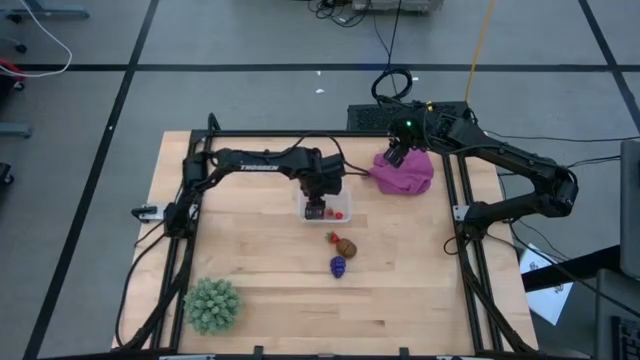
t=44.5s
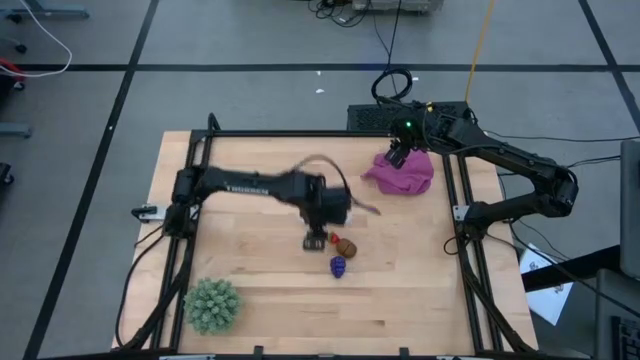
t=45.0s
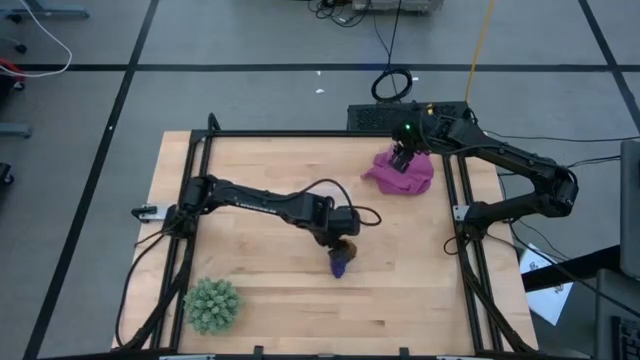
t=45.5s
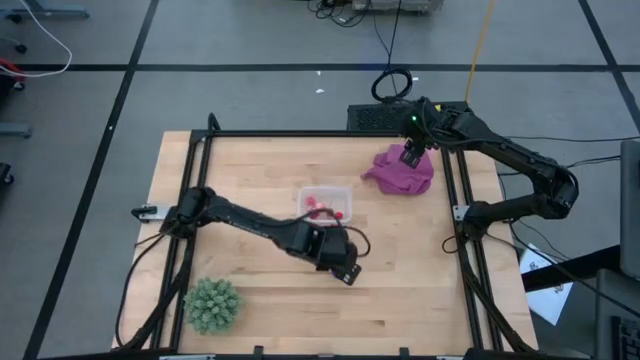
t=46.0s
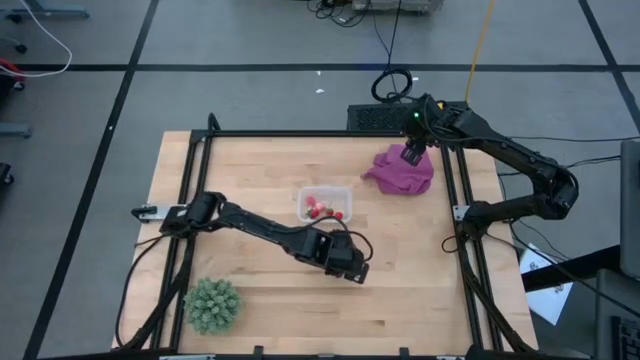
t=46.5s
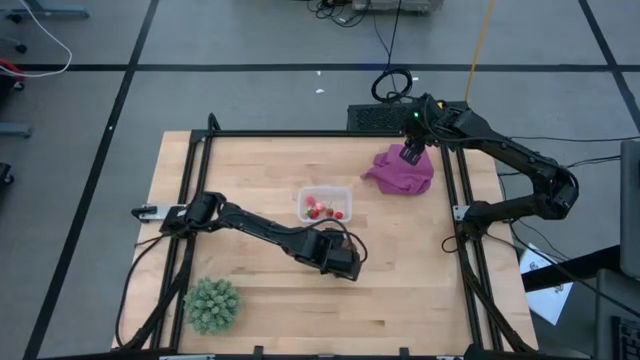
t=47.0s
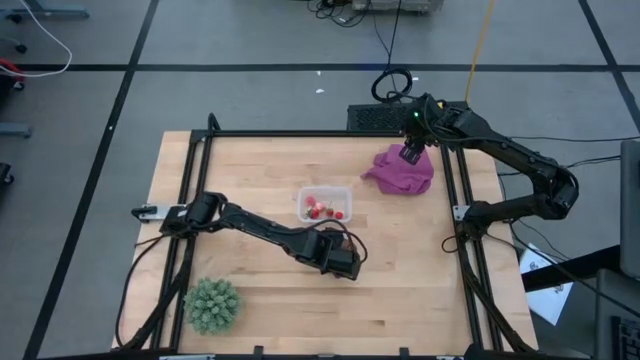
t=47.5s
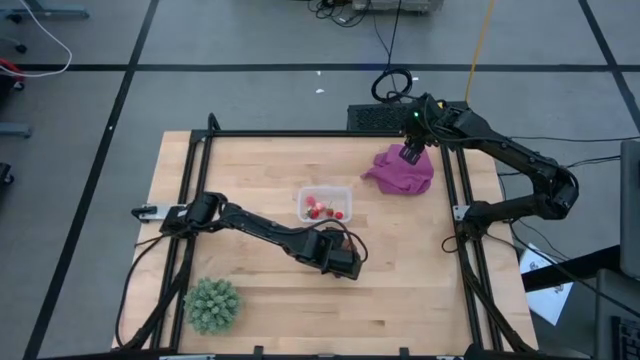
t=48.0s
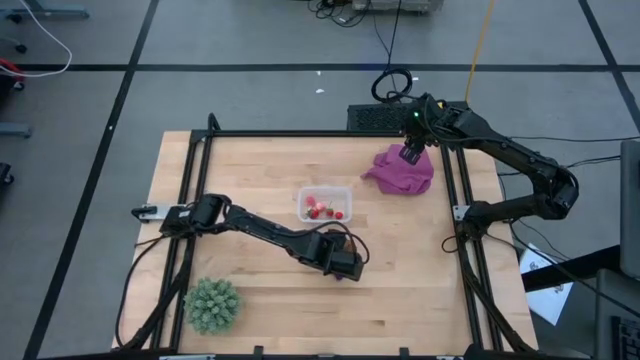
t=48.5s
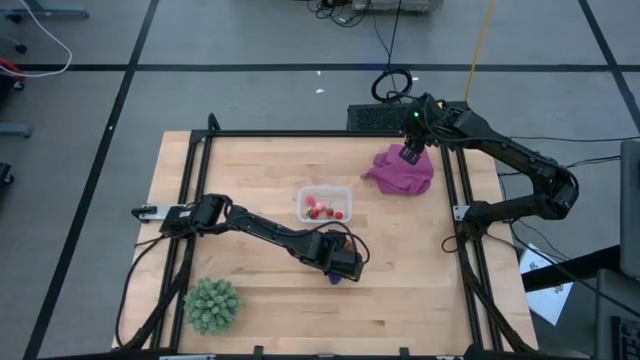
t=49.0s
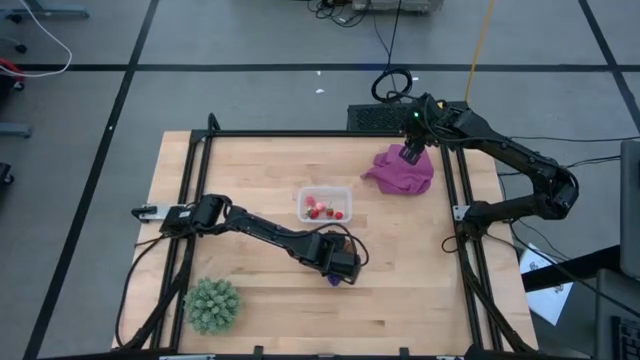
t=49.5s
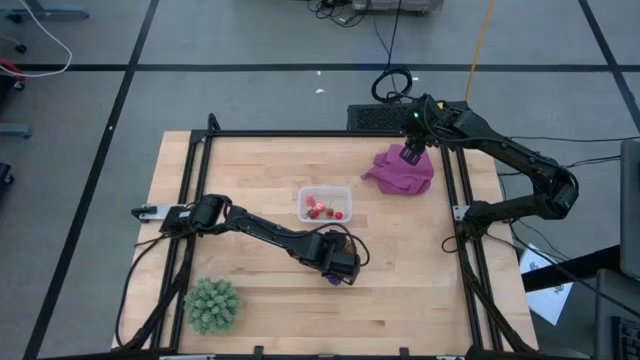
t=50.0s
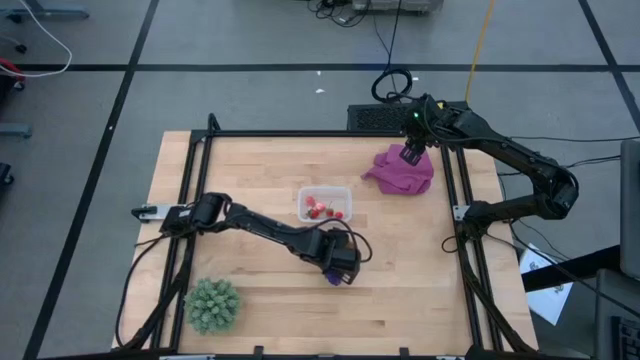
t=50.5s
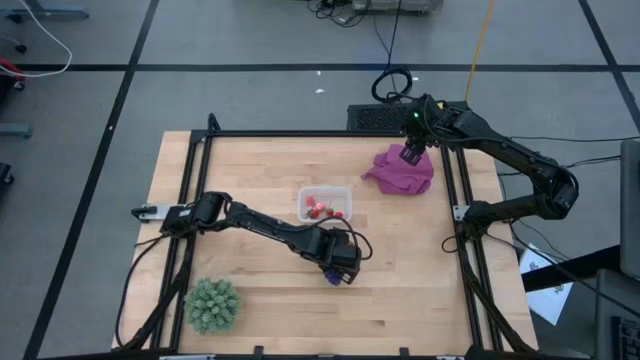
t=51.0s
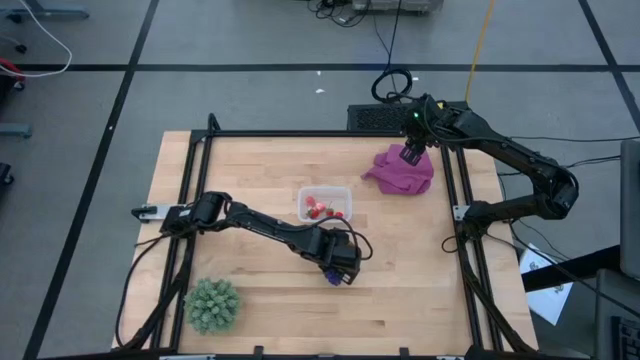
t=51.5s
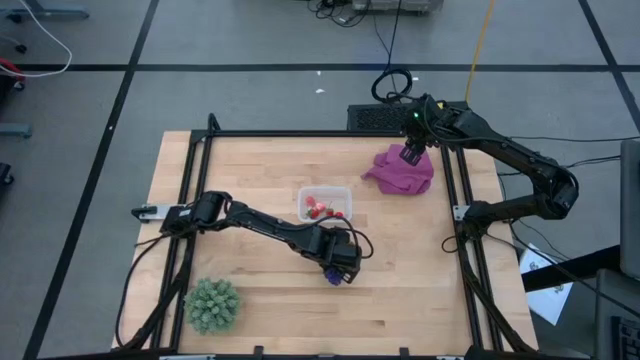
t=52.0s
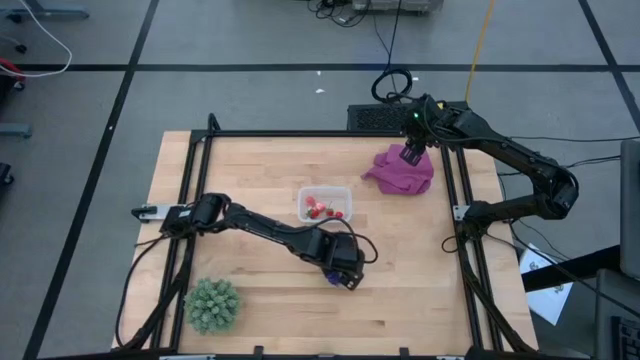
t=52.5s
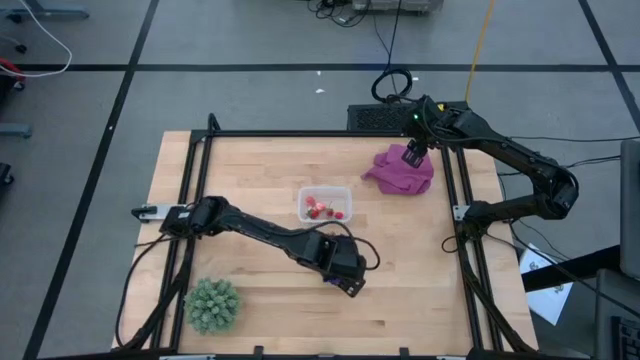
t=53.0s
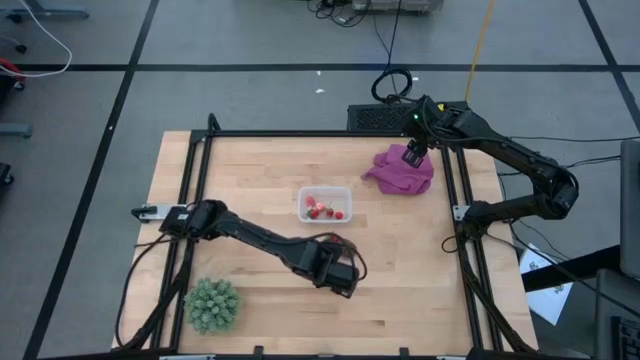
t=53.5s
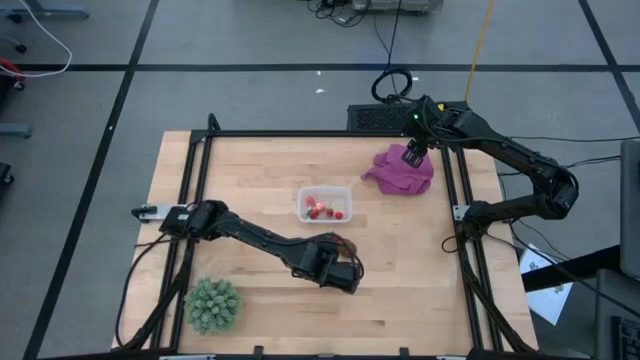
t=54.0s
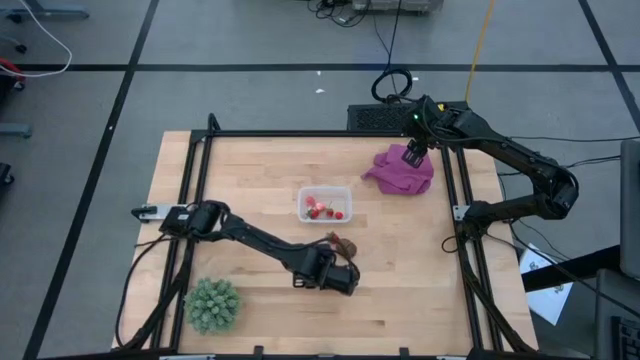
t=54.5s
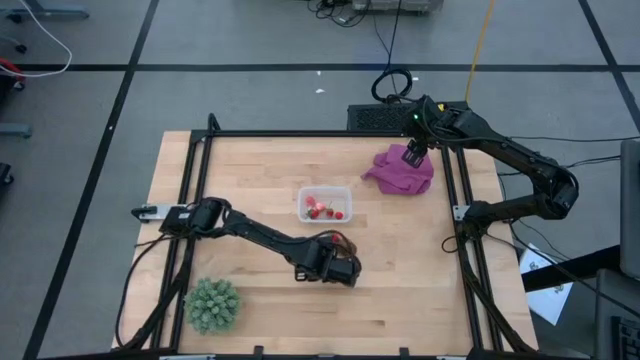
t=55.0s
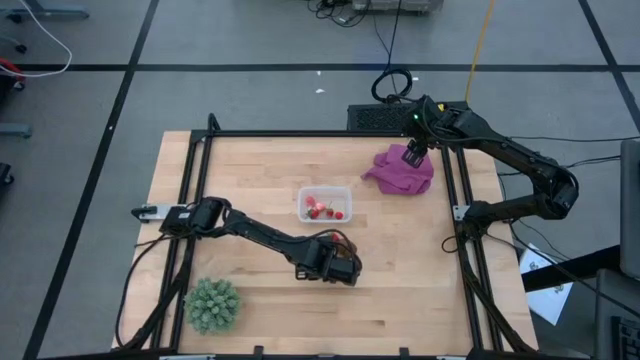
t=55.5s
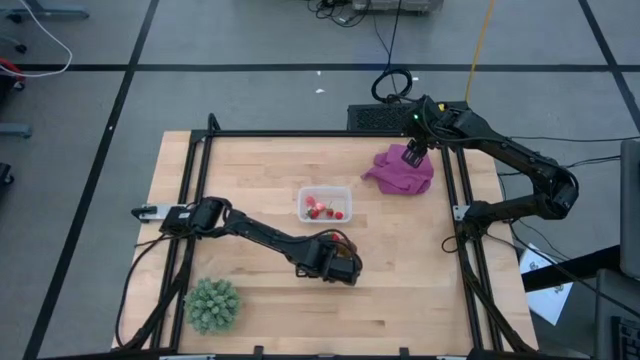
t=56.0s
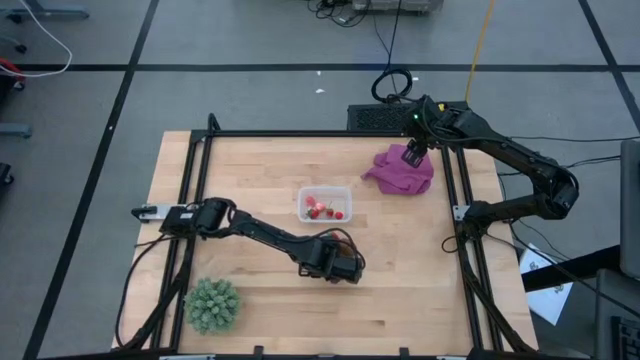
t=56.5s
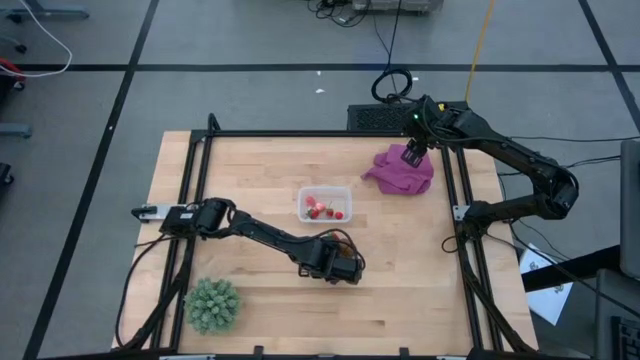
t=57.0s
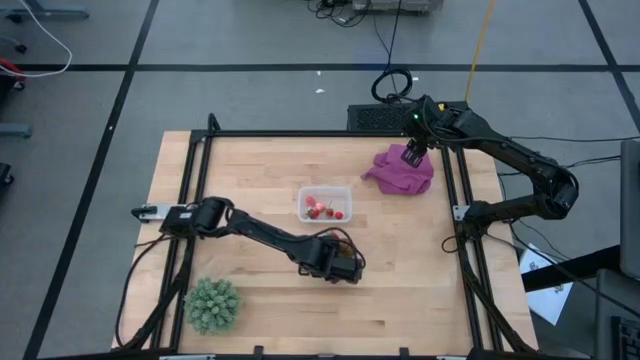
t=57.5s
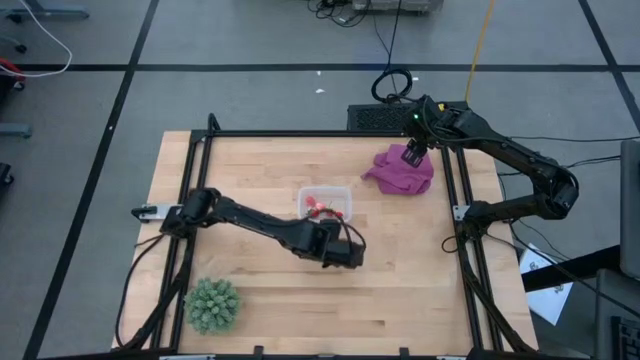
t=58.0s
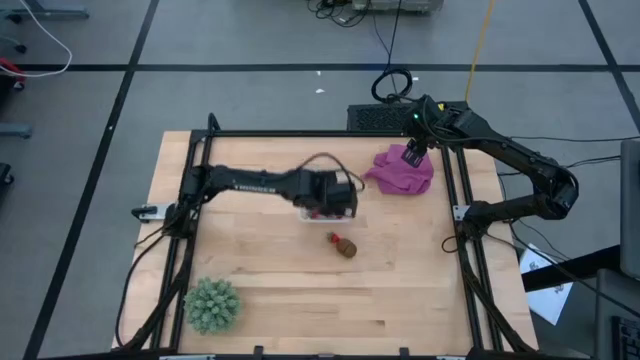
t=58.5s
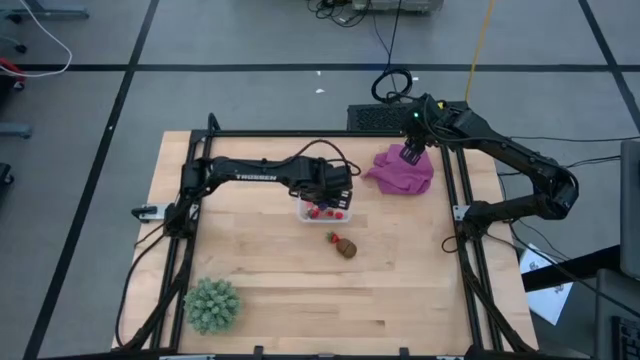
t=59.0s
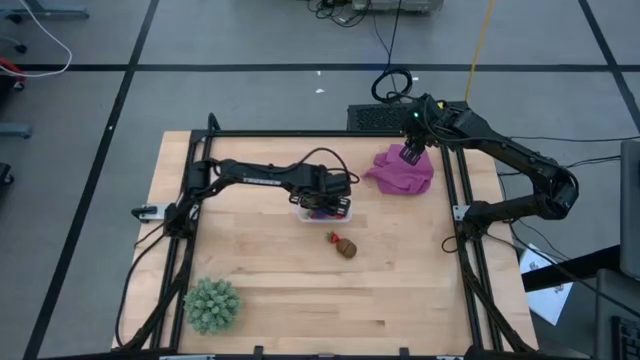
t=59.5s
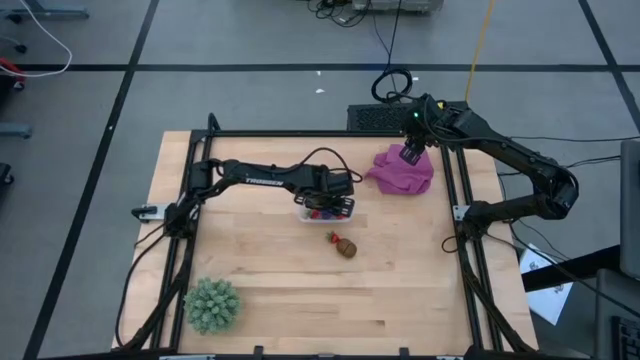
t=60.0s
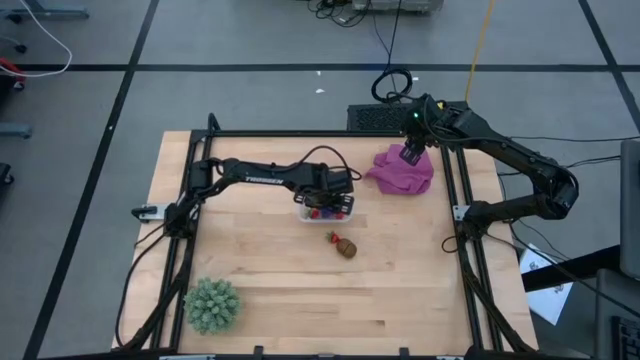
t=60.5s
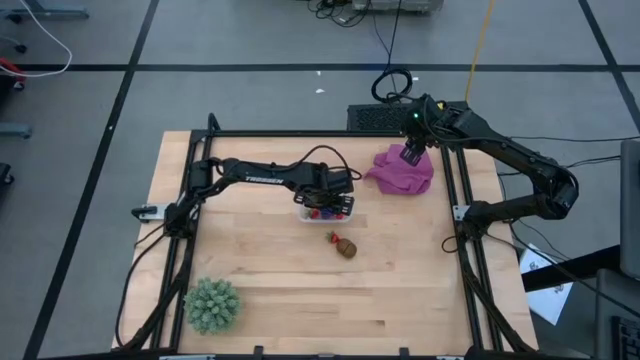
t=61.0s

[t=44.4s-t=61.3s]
Task: Pick and placing Produce into tupperware
Put the blueberry into the transparent bin

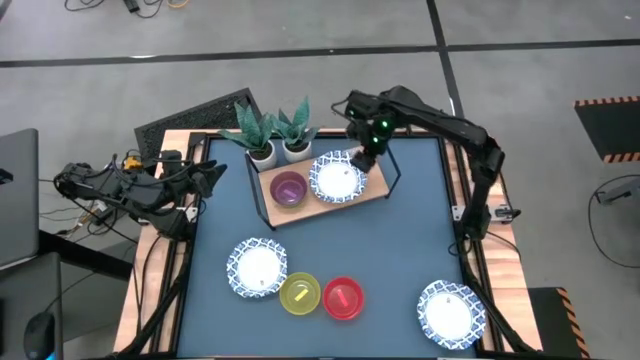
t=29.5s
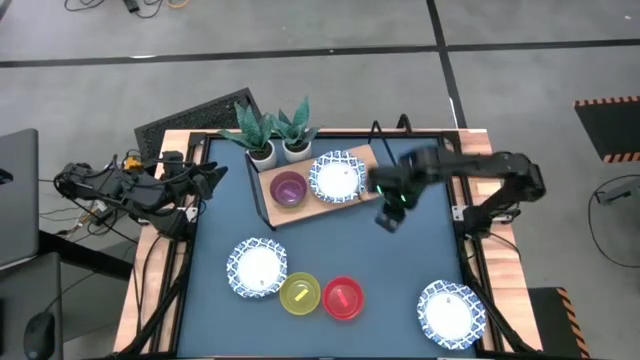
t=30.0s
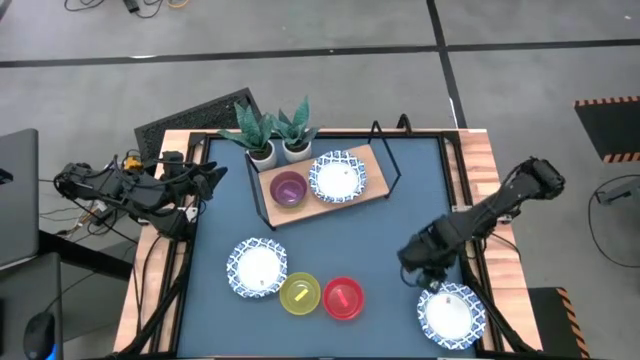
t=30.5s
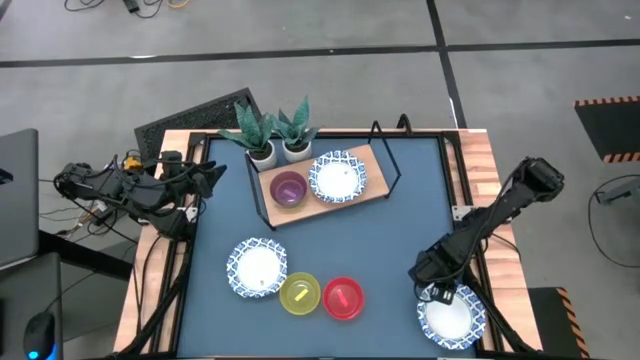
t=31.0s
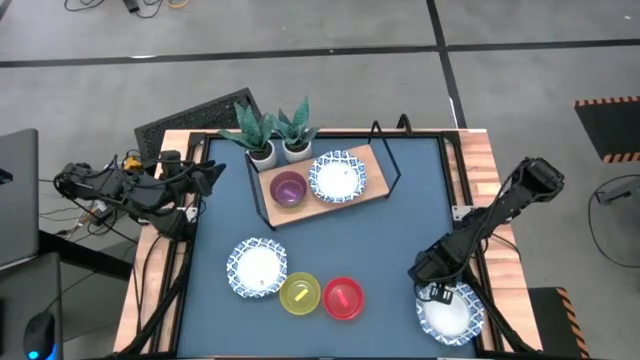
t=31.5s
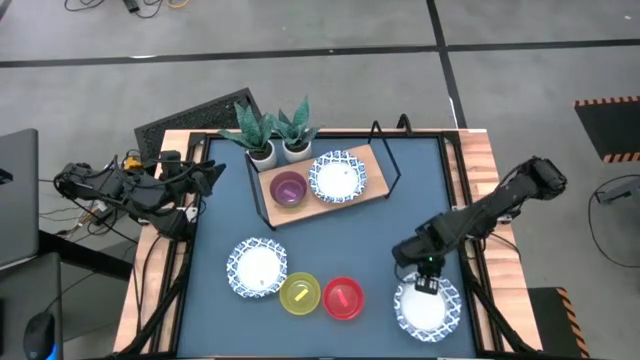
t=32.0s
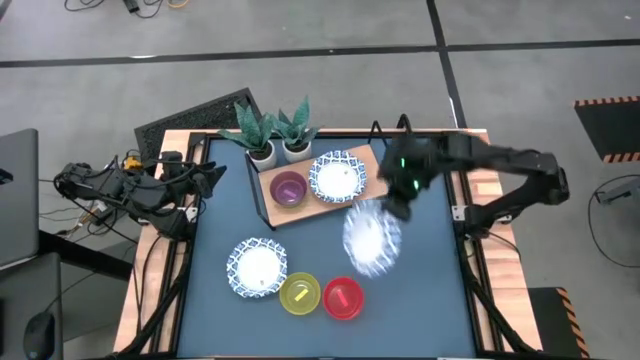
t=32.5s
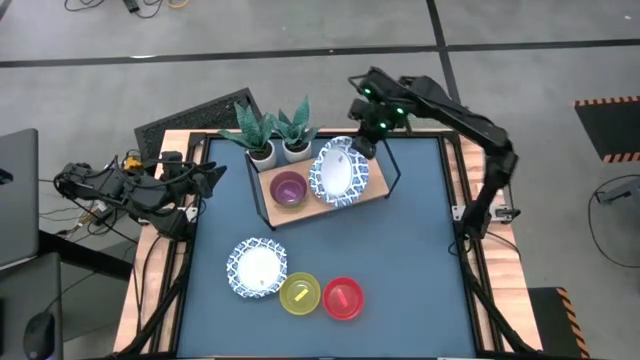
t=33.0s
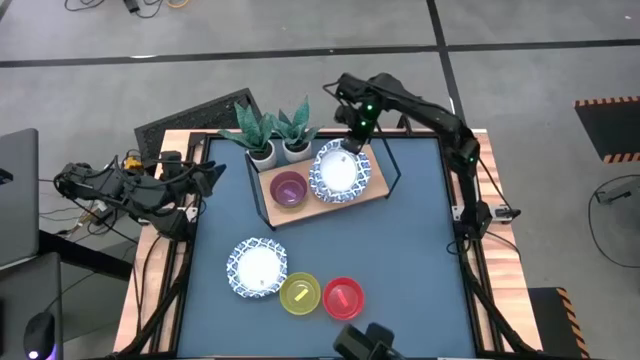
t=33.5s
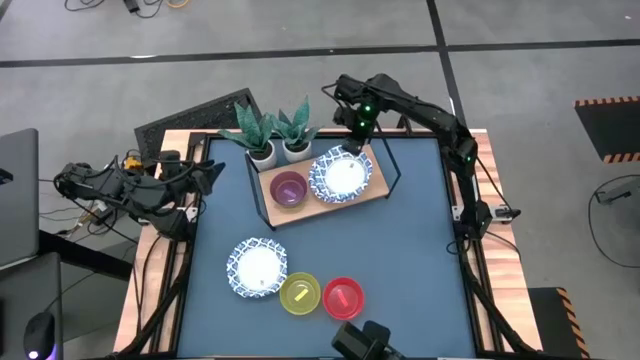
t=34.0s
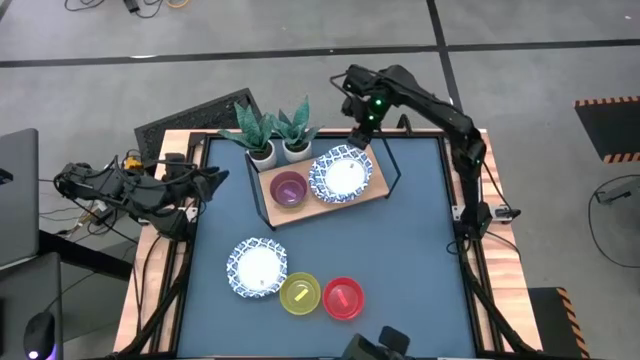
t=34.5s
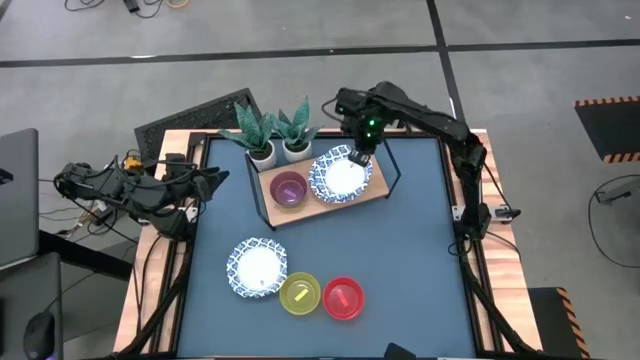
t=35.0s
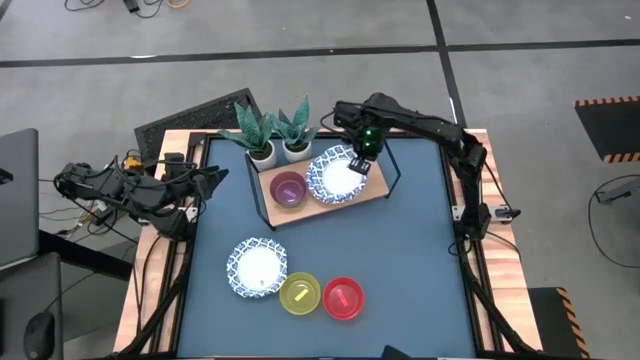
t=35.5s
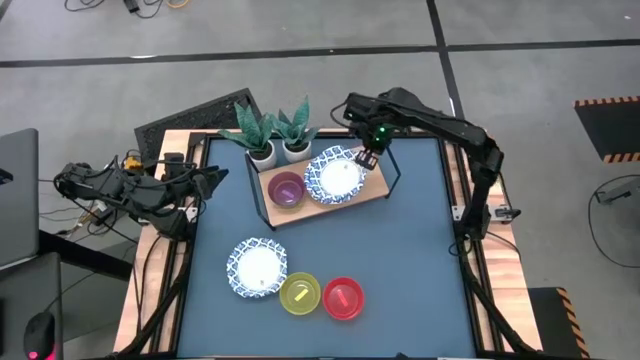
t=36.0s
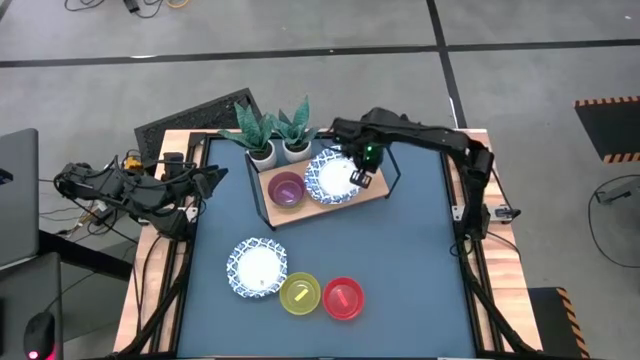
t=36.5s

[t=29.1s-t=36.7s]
Task: Place and stack bowls onto a shelf
Stack the white patterned bowl on top of the white patterned bowl on the shelf
